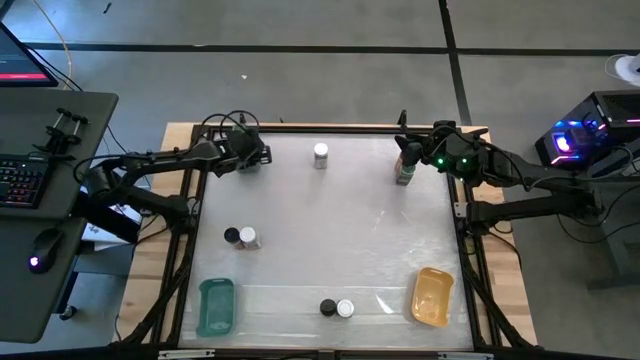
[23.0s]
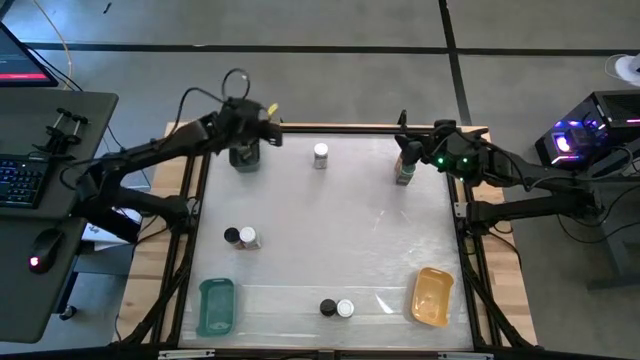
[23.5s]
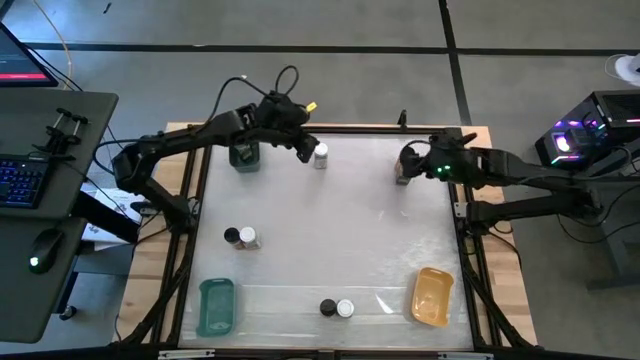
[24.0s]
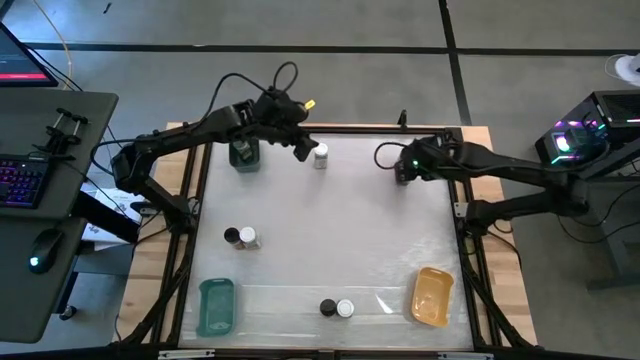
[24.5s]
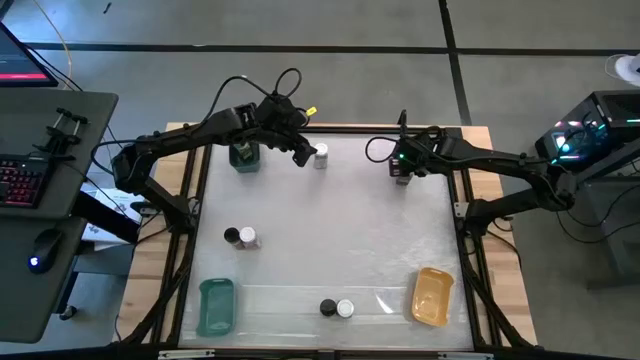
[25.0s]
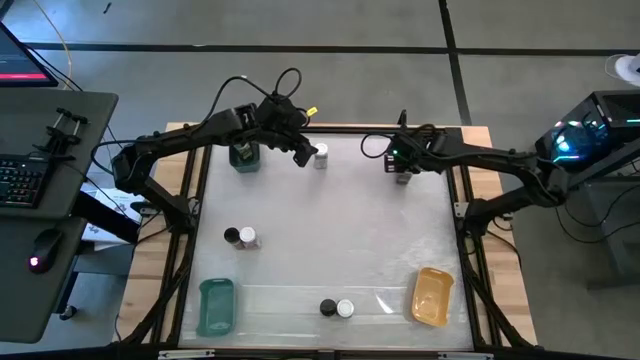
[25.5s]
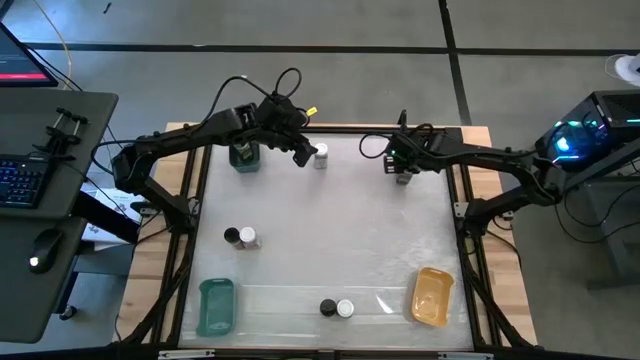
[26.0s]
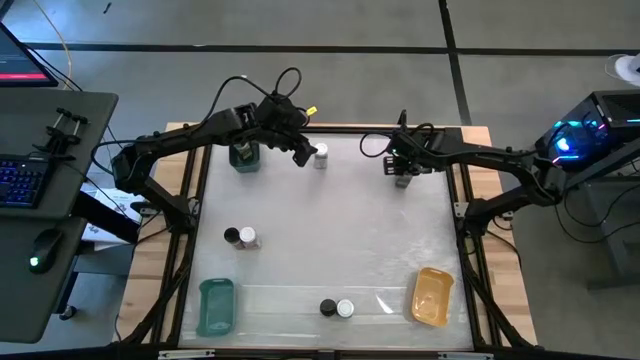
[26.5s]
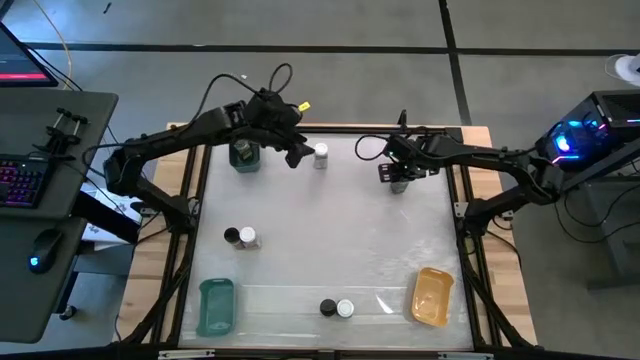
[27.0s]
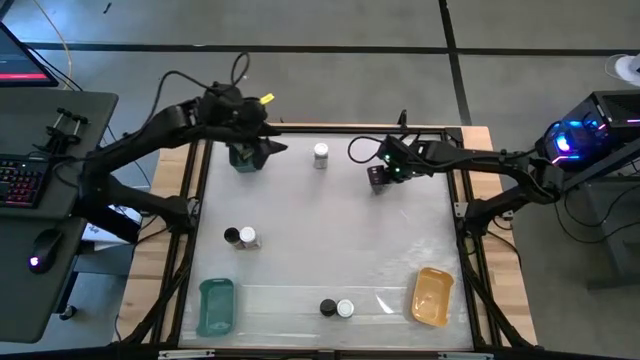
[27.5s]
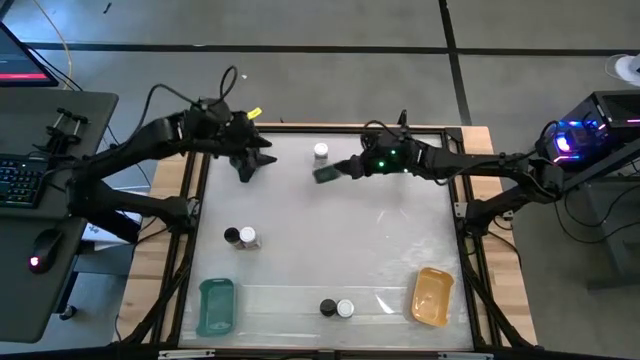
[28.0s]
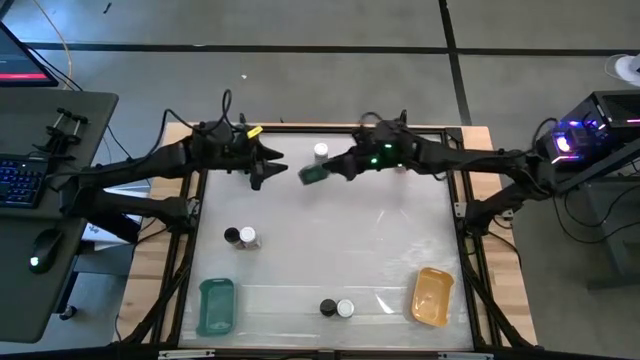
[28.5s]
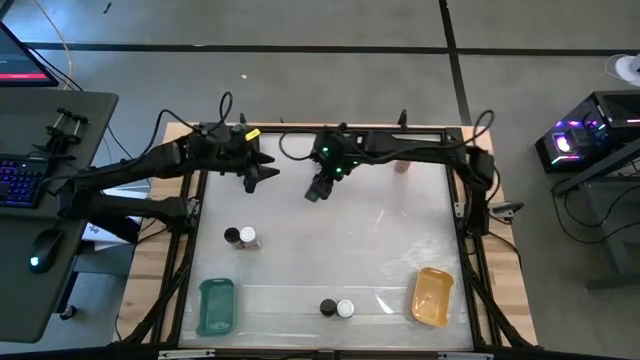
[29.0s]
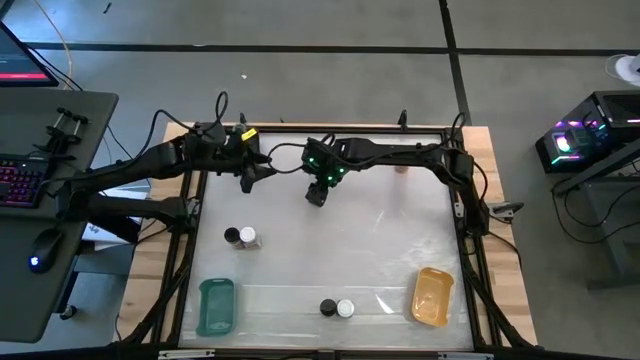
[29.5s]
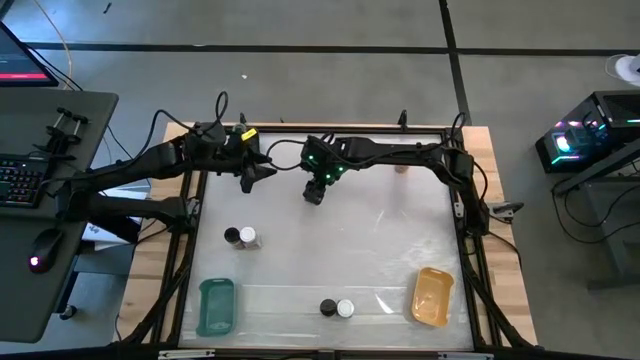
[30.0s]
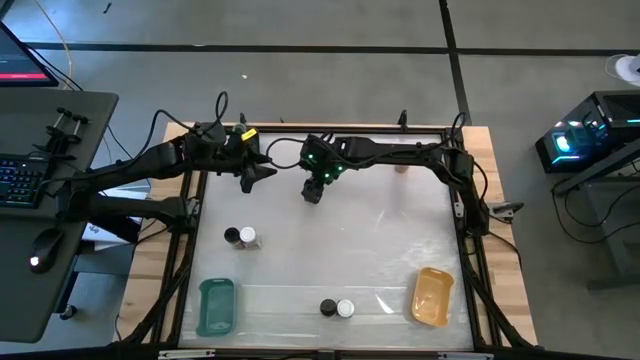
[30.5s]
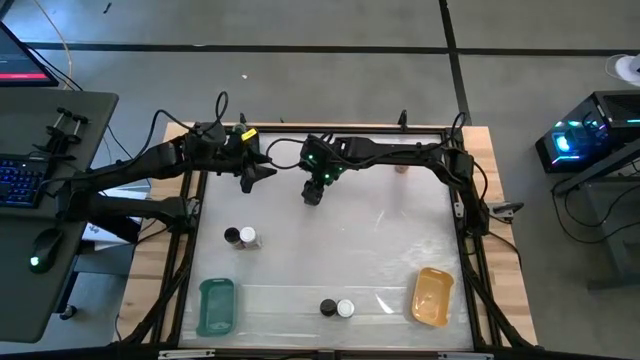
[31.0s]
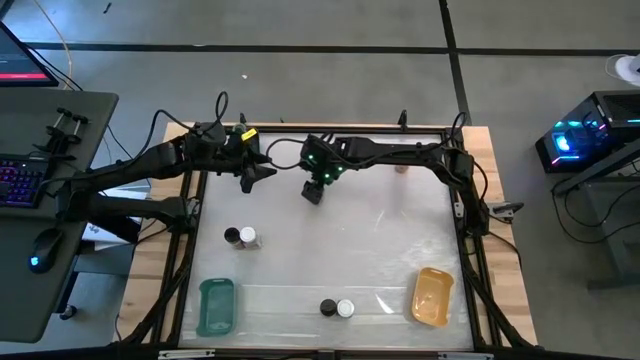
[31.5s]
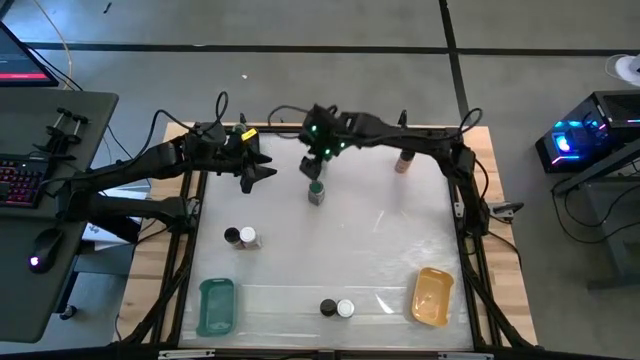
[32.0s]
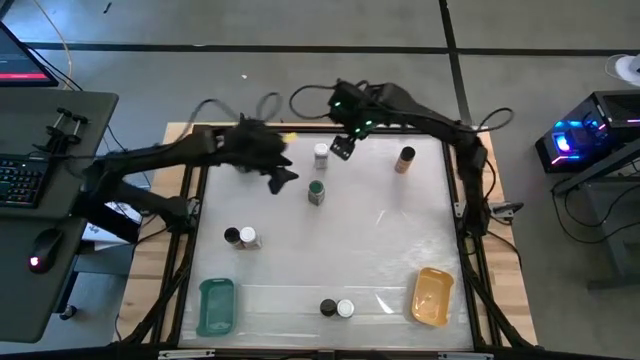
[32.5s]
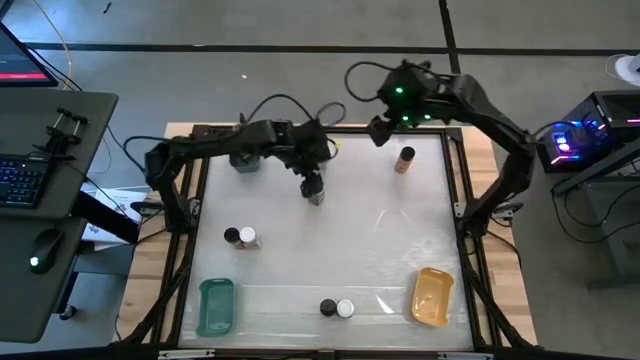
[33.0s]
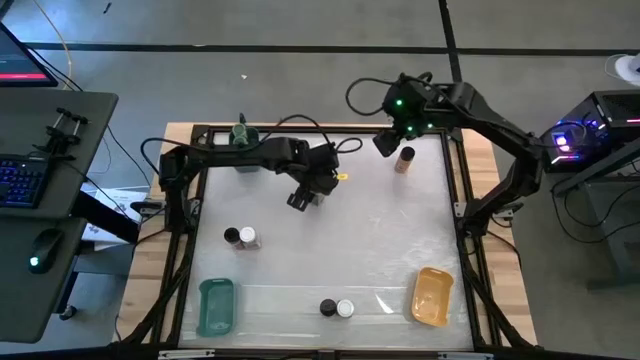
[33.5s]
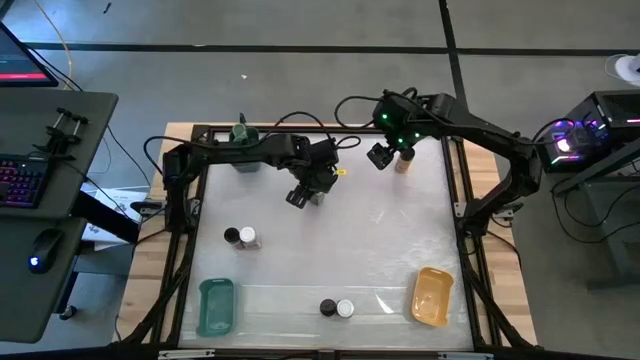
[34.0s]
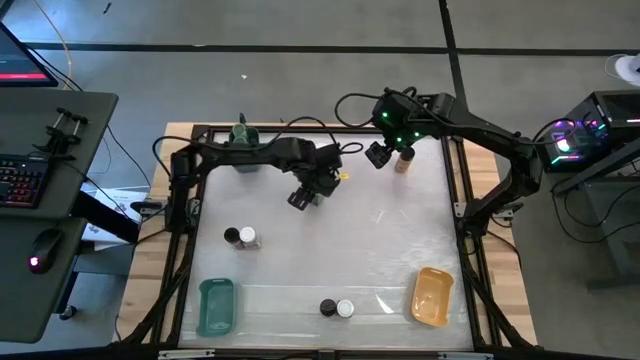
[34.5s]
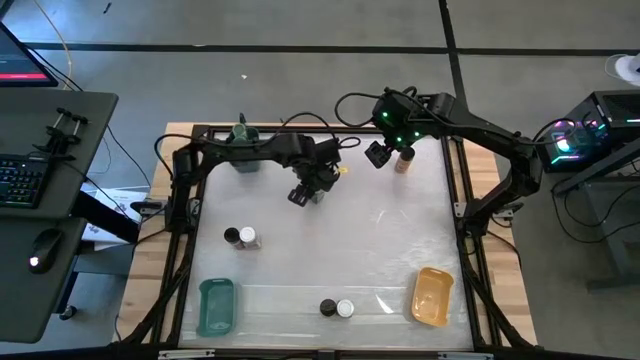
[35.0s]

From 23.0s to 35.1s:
Task: Sort spices by type
Put the green seasoning bottle into the blue bin

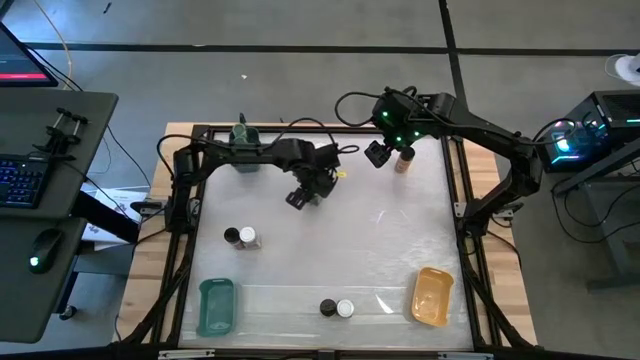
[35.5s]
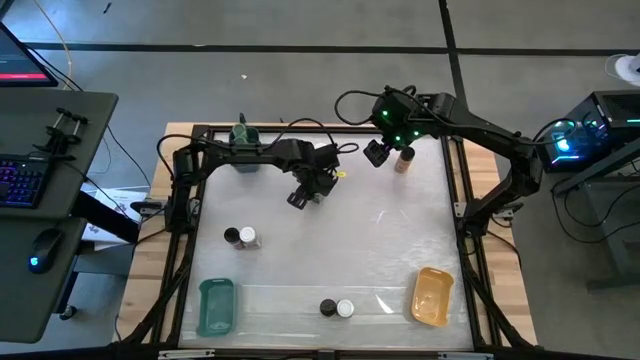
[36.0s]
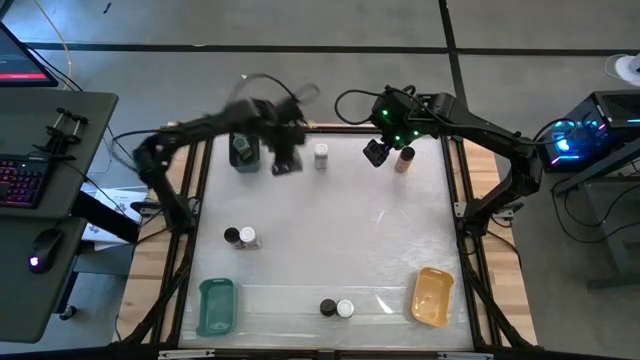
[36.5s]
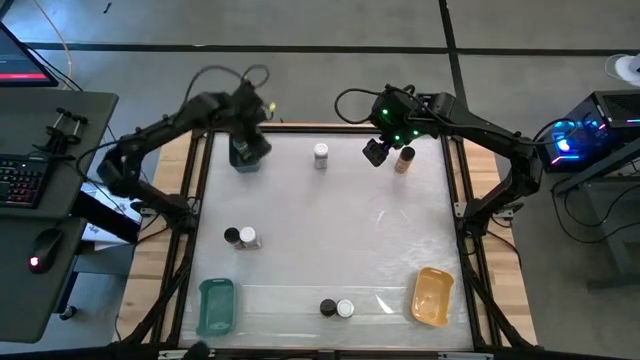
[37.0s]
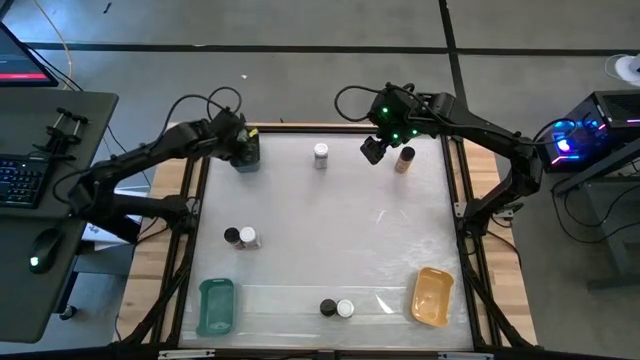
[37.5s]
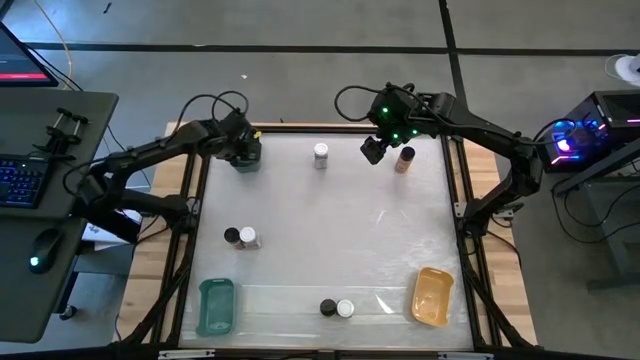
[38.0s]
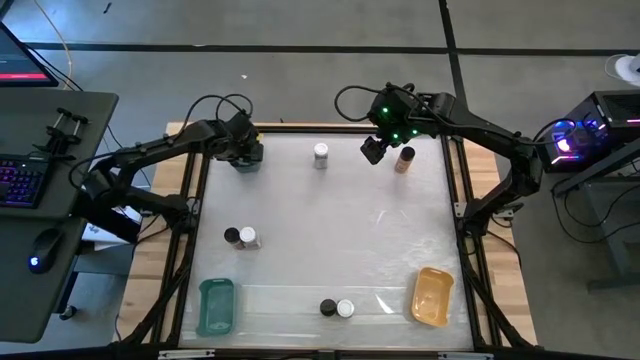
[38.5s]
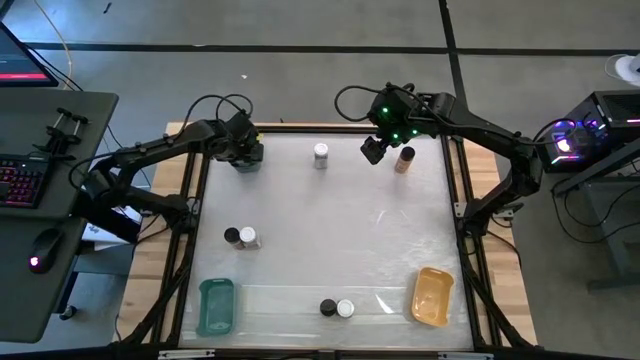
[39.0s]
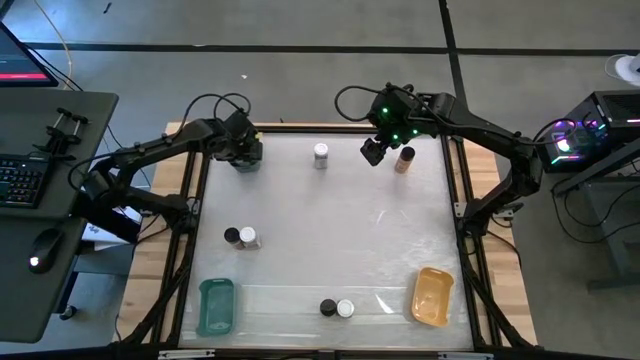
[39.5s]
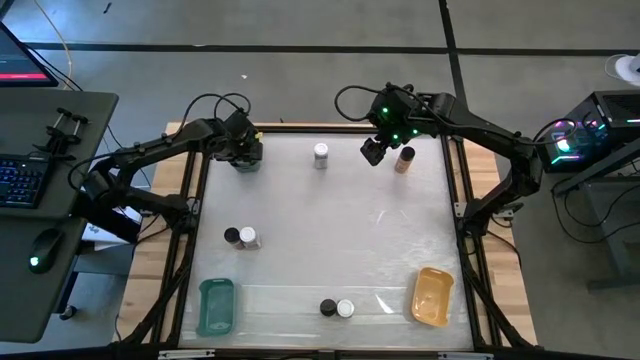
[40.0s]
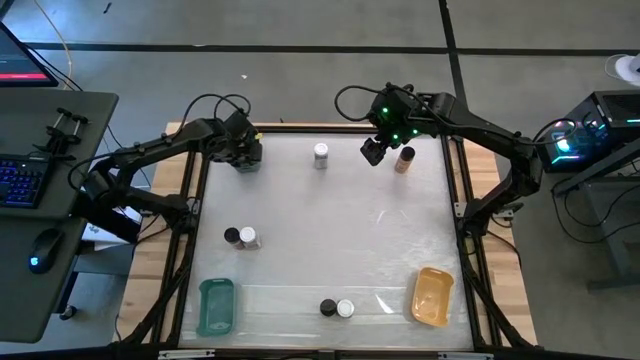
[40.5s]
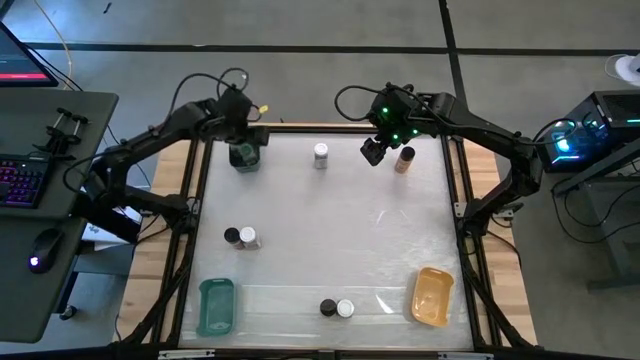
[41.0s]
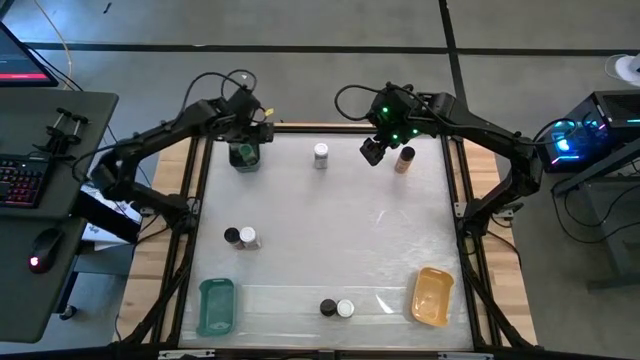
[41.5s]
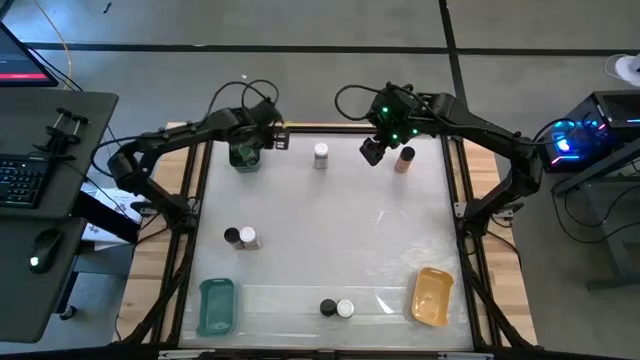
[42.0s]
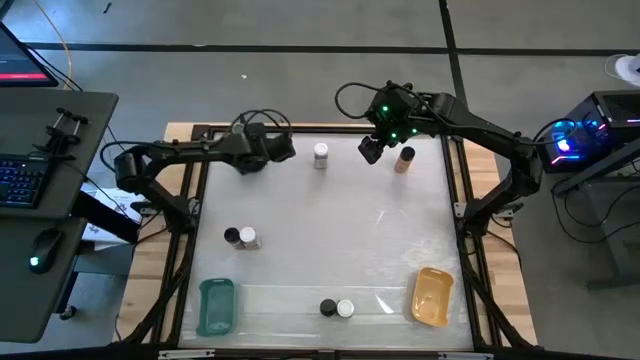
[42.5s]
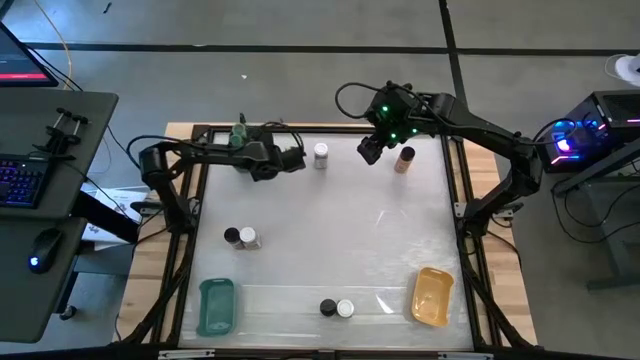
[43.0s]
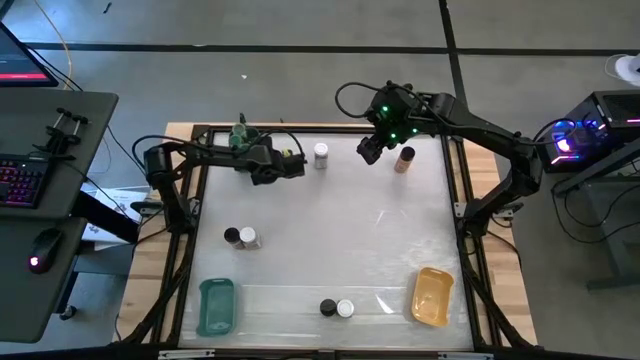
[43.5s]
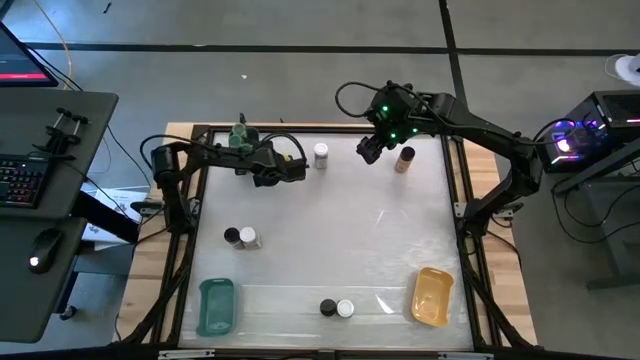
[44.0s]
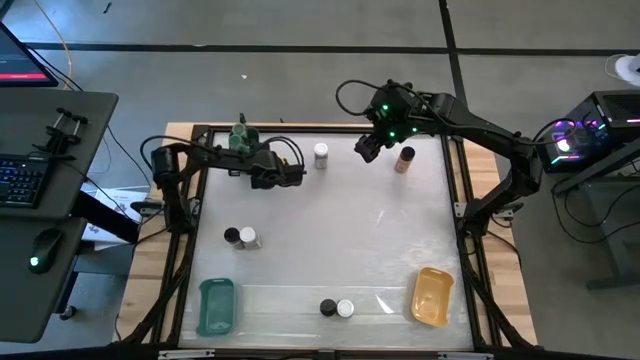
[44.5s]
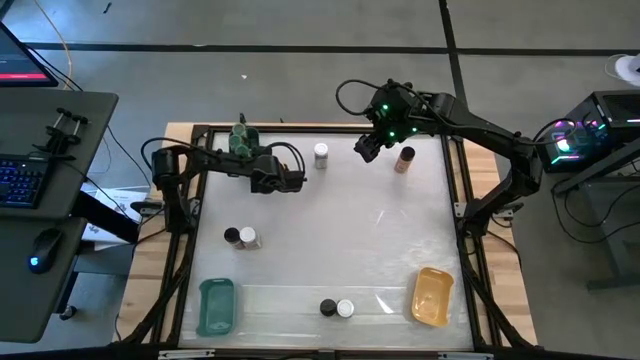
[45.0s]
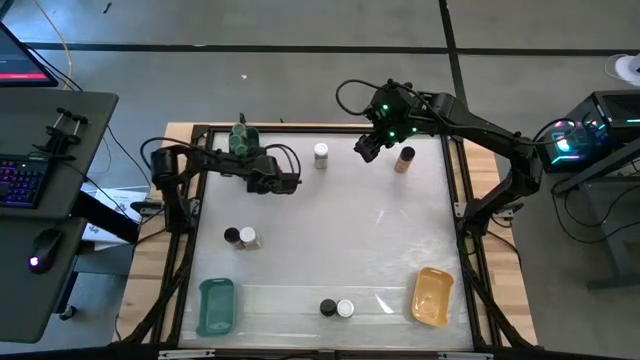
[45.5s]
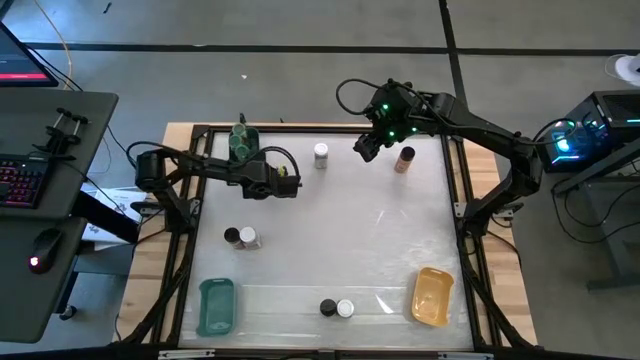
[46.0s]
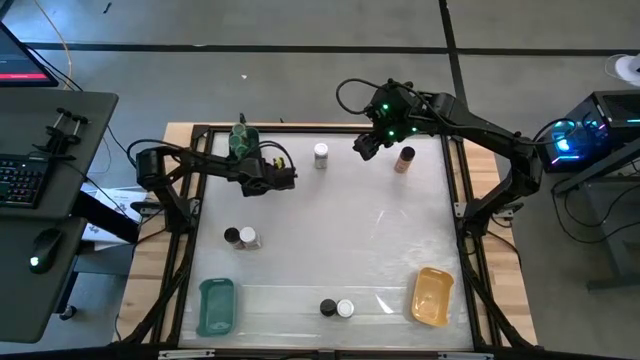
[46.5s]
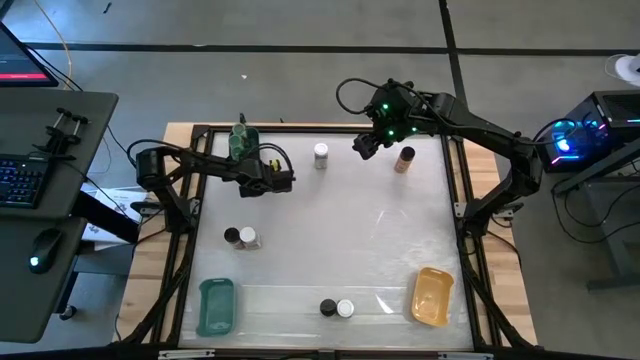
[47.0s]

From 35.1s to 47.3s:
Put the green seasoning bottle into the blue bin
